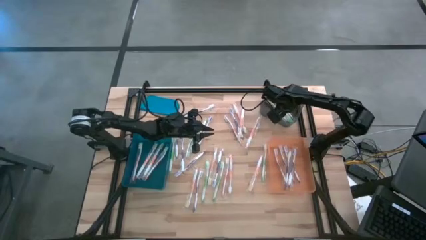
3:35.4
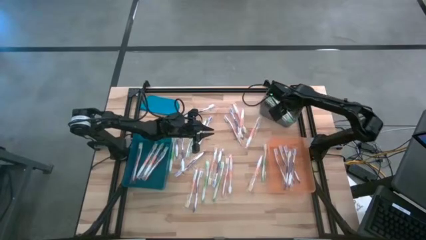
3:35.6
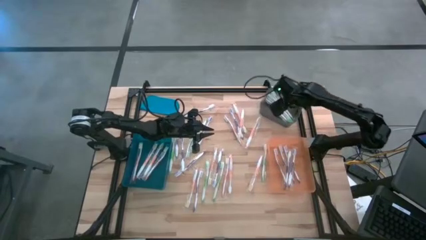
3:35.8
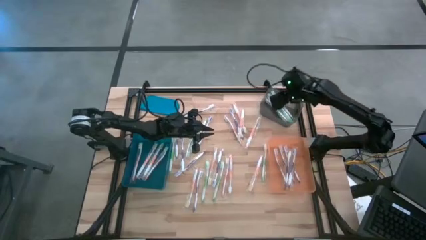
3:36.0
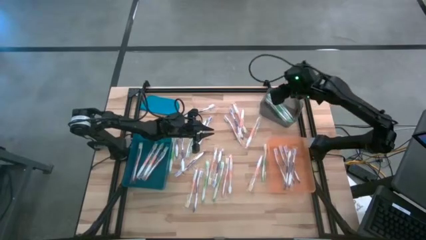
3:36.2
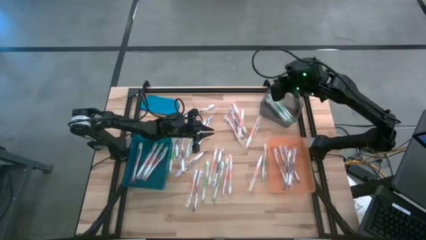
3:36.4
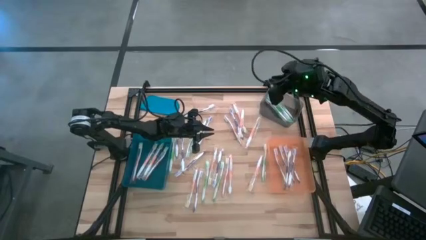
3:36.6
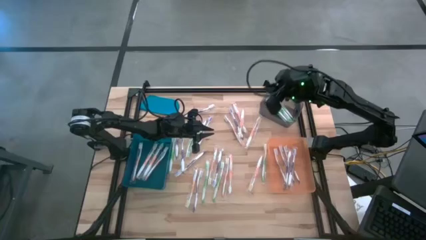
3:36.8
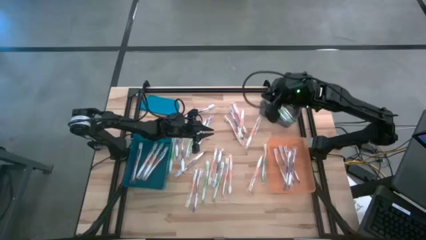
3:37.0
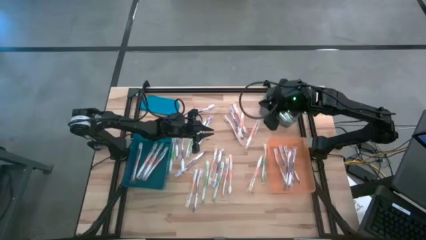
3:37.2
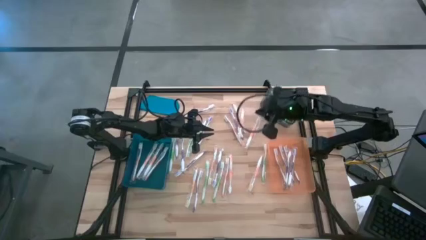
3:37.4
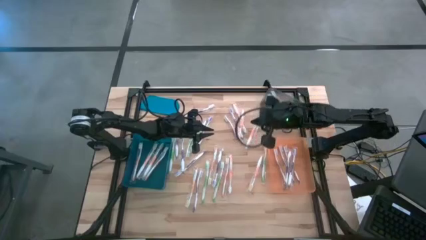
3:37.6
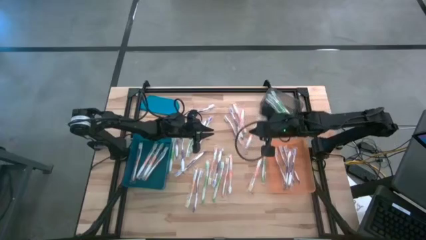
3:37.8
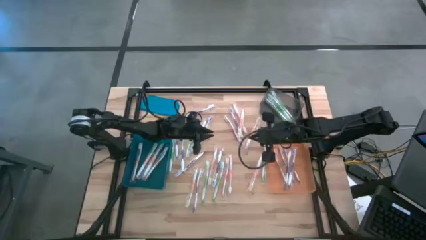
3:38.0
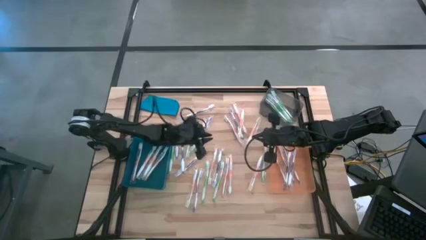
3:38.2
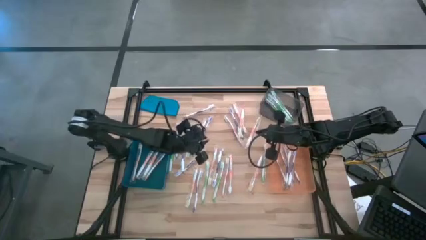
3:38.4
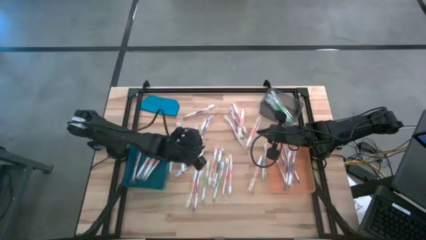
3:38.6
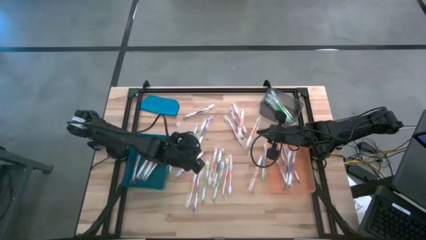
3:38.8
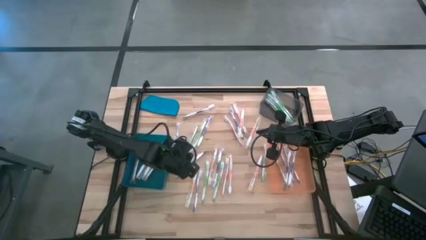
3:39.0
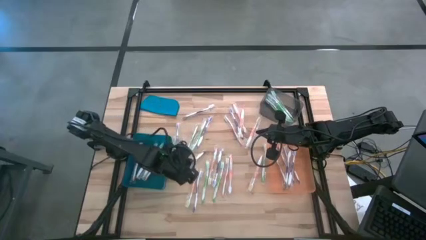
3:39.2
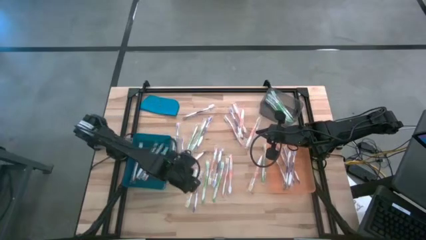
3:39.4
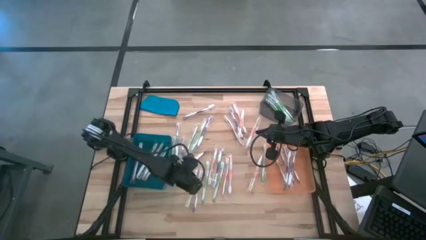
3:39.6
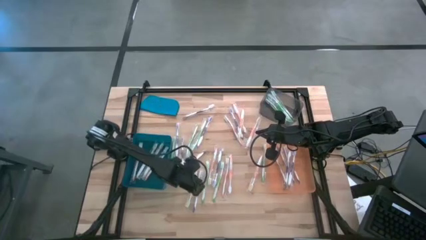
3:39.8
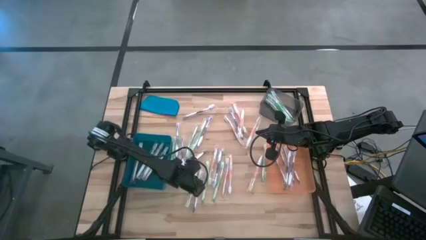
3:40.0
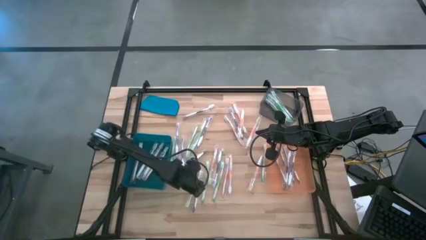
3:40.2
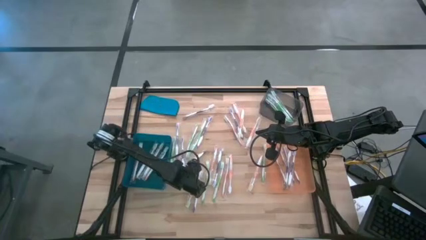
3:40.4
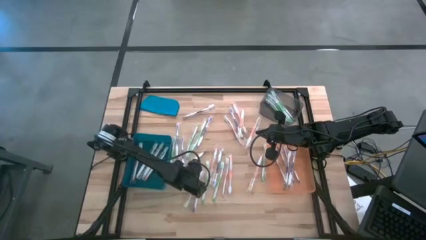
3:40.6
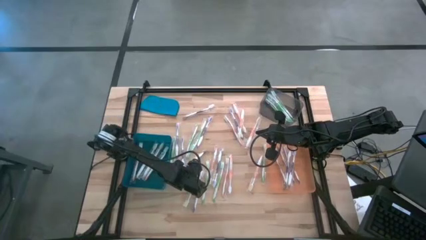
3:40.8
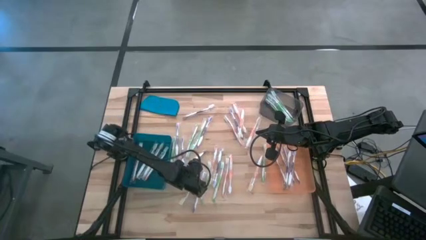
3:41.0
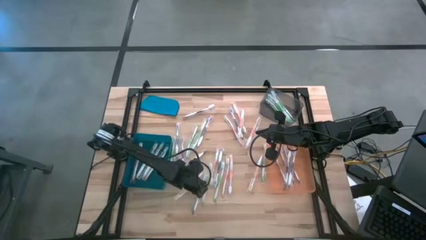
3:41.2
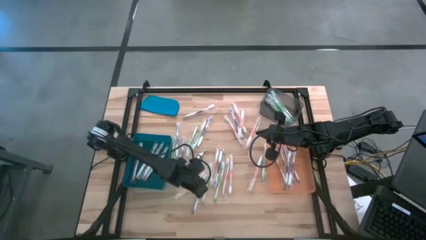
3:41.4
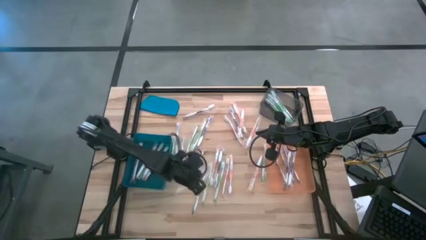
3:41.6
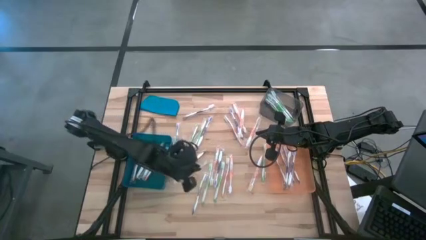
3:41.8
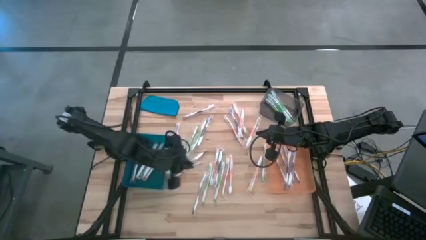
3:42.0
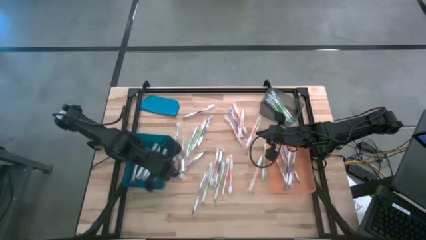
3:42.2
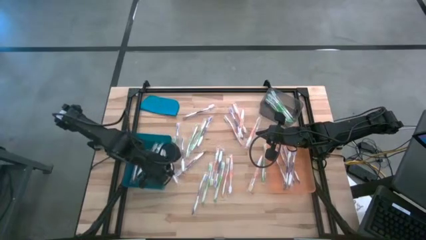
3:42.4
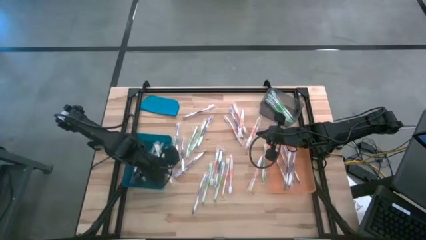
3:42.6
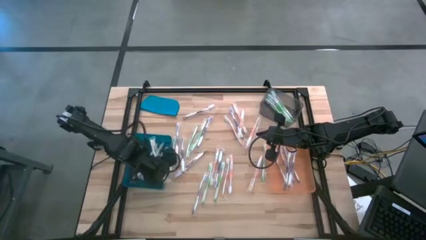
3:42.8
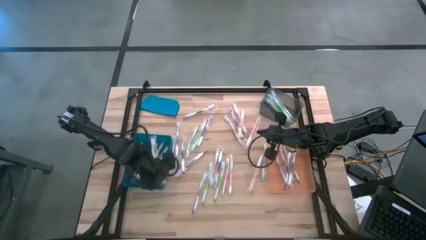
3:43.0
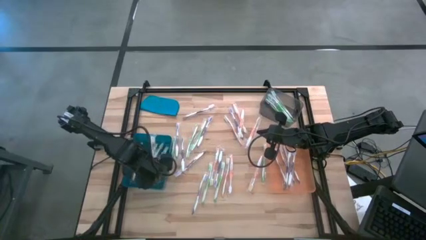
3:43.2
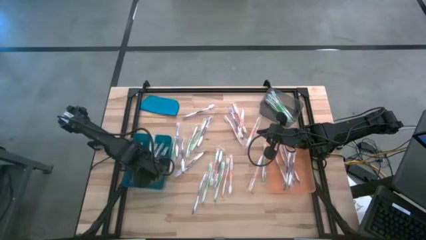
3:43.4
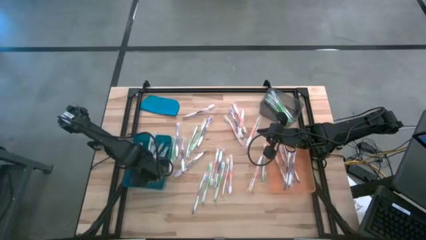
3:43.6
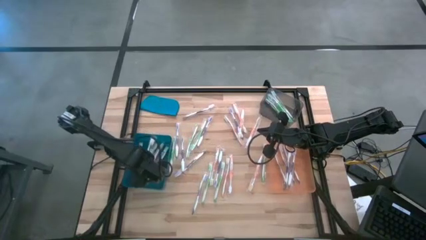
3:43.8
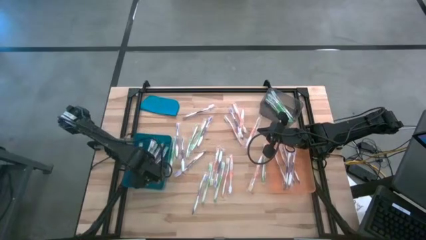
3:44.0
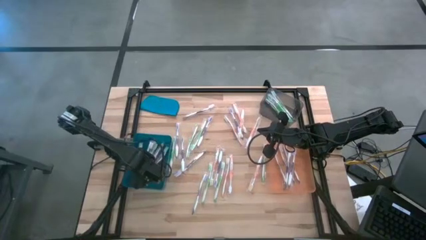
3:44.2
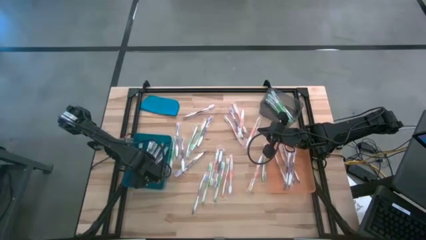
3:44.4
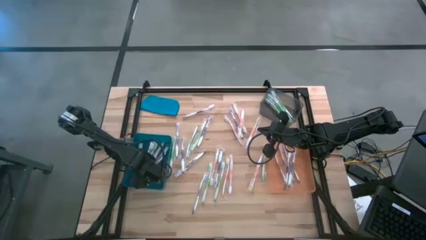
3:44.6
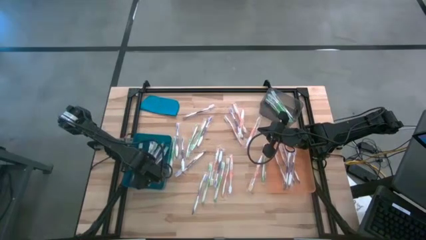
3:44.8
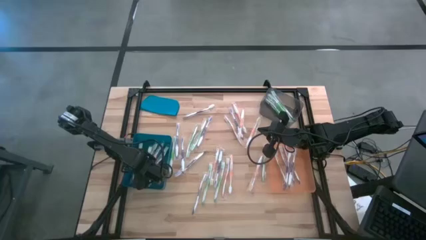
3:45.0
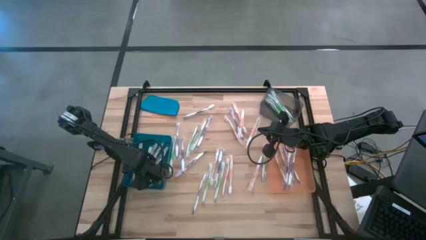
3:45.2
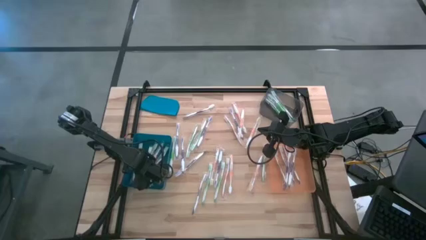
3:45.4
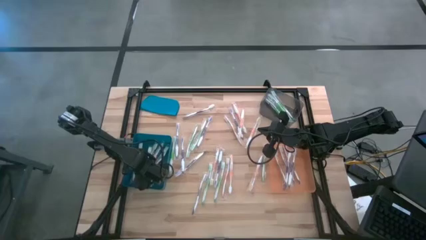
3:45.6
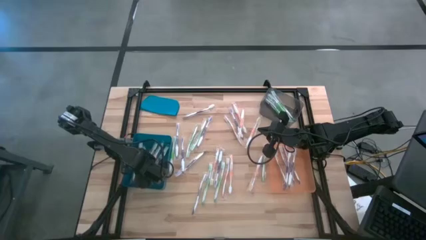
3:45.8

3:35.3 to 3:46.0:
Task: Pick & Place Toothbrushes
Put the orange toothbrush into the blue bin
